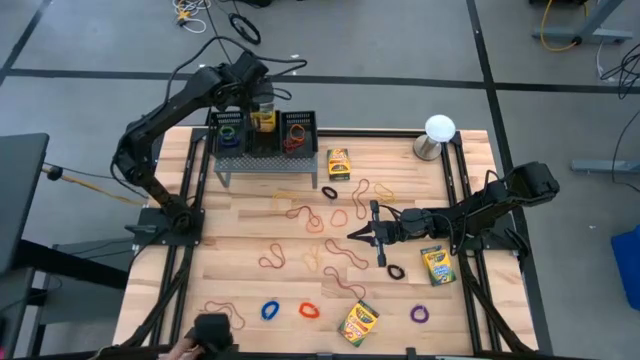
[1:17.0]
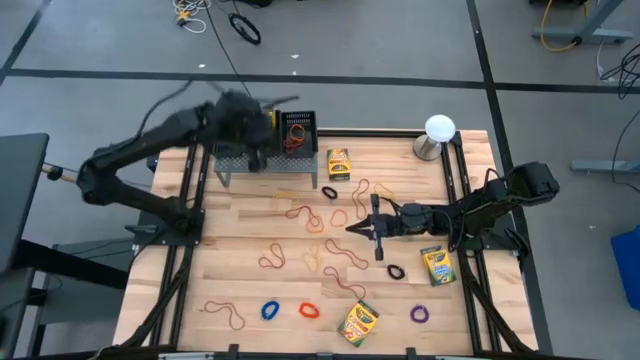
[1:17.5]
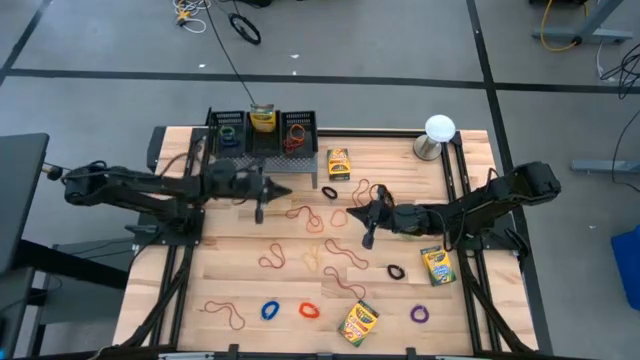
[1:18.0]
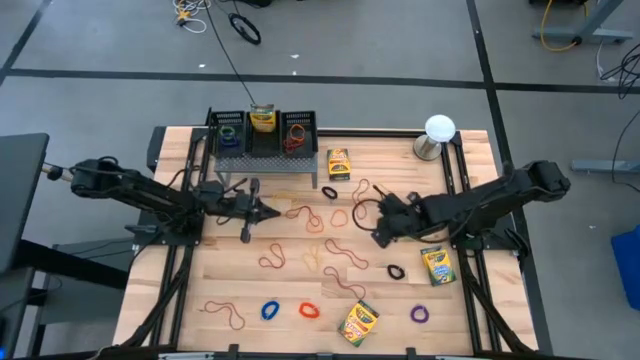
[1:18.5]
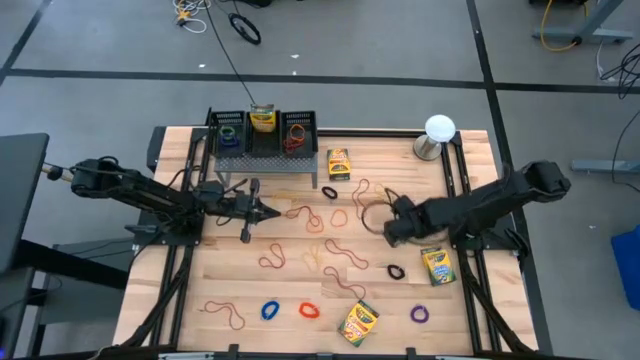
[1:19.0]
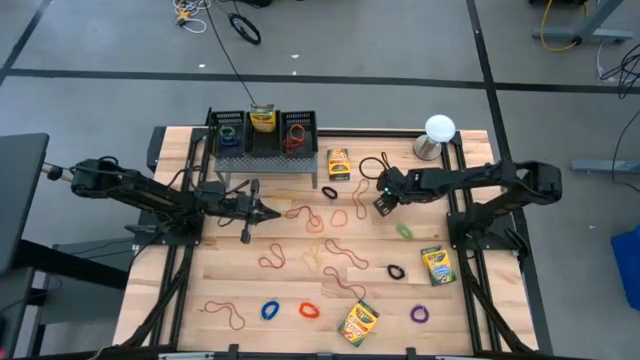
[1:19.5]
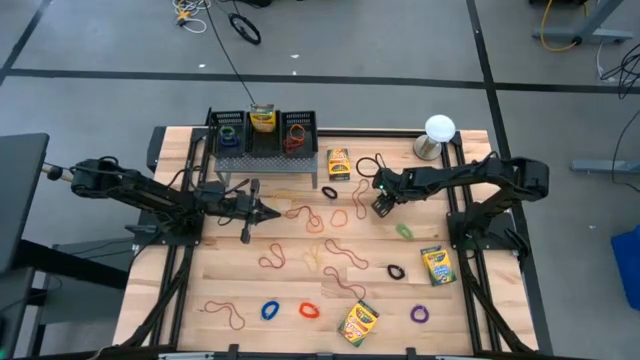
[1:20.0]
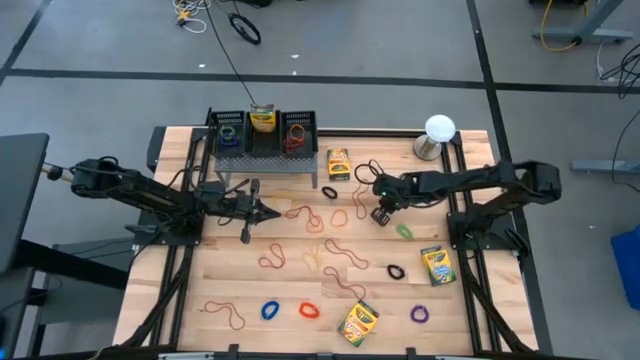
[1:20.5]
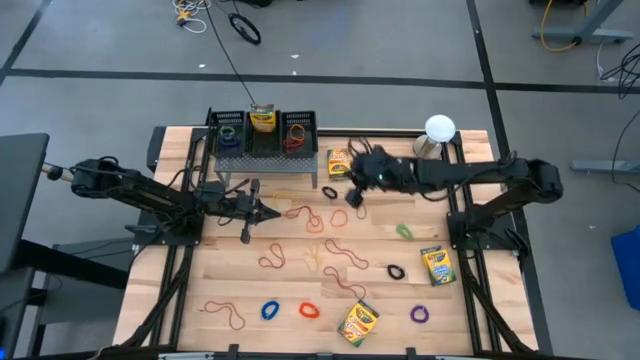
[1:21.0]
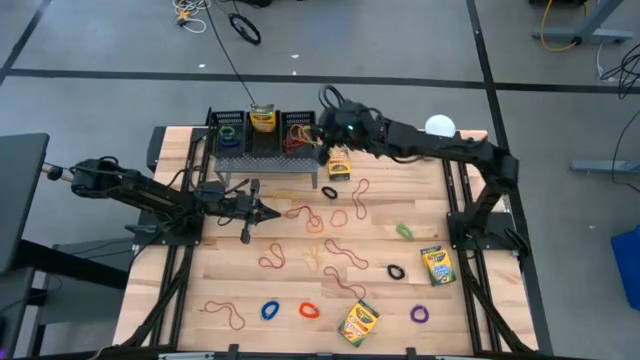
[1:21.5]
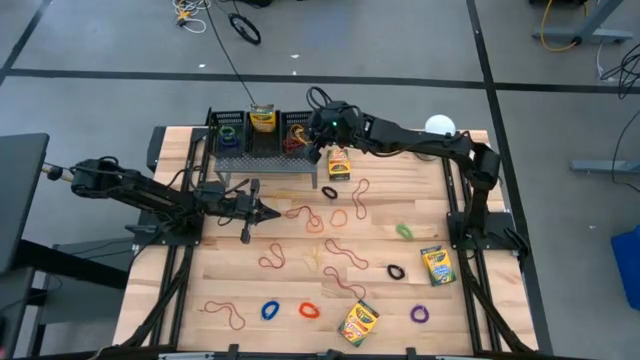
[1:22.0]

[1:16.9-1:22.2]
Task: Pick & Place Office Desk Supplies
Put the yellow rubber band into the right black bin

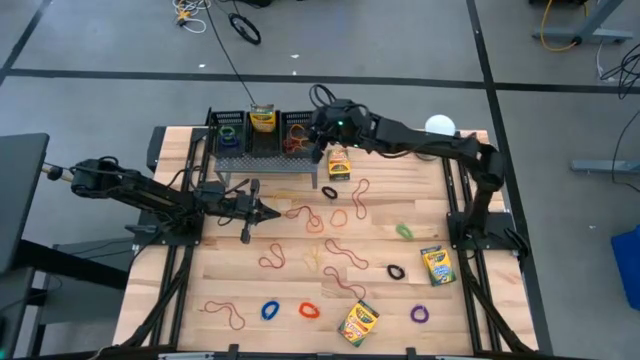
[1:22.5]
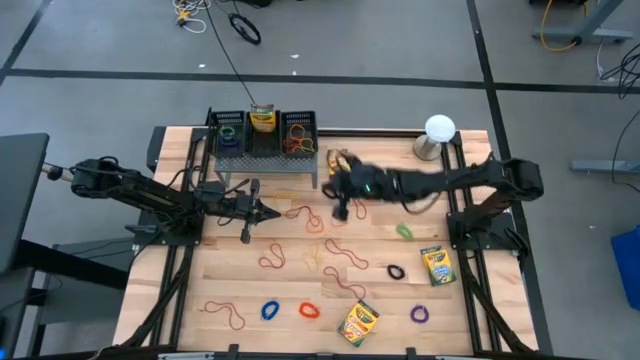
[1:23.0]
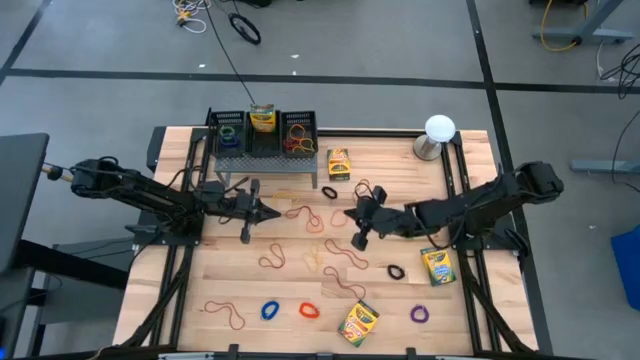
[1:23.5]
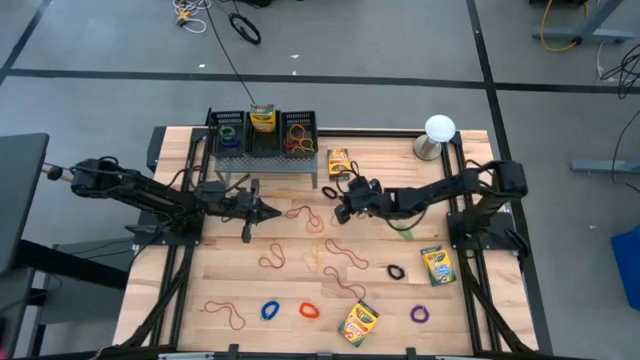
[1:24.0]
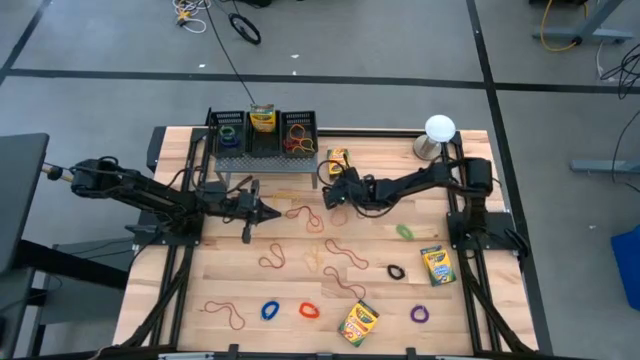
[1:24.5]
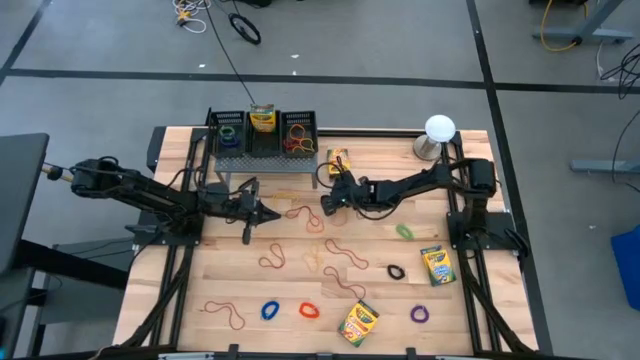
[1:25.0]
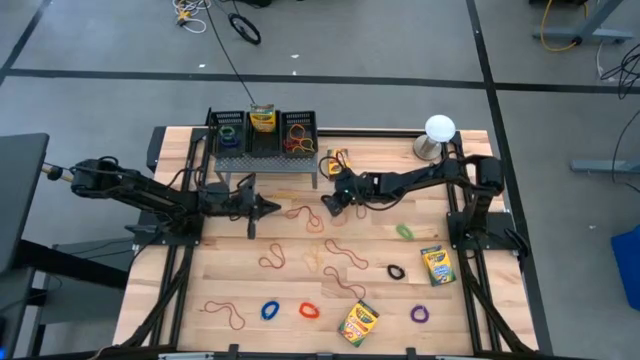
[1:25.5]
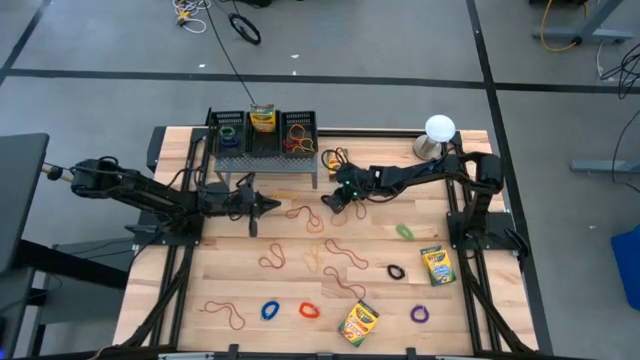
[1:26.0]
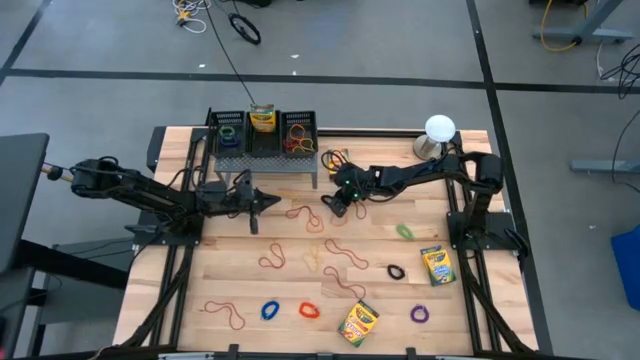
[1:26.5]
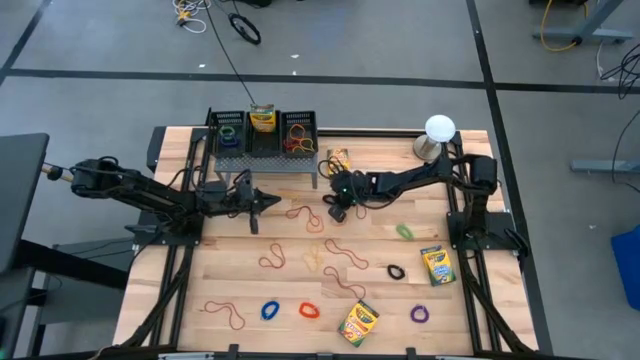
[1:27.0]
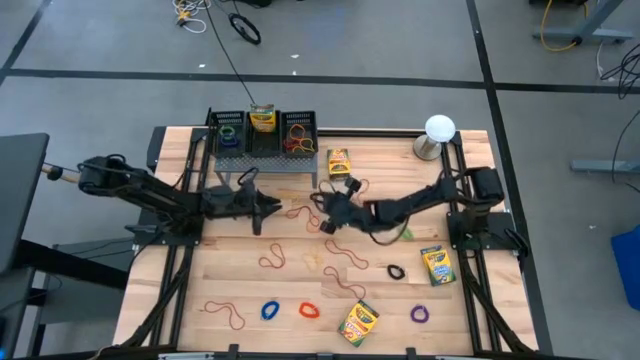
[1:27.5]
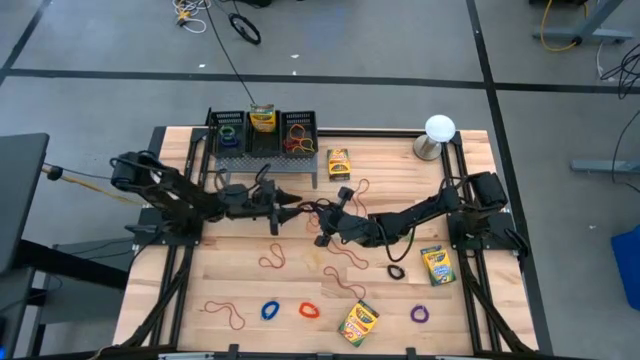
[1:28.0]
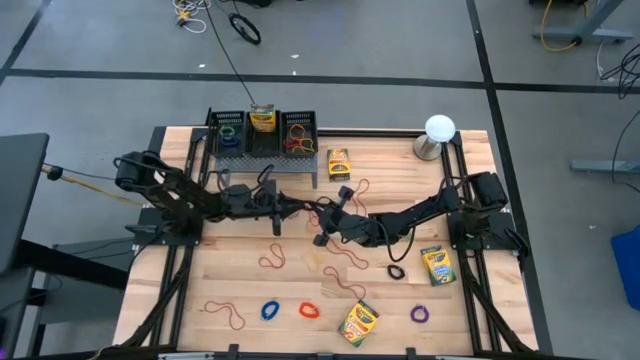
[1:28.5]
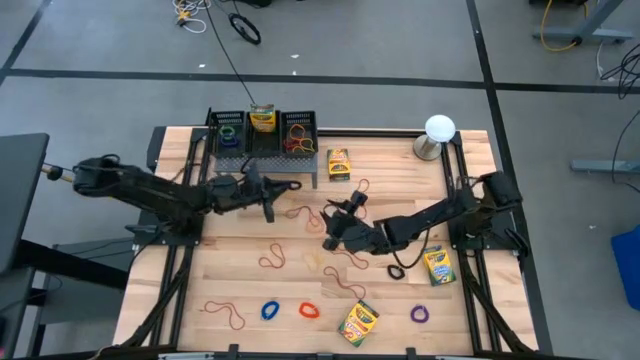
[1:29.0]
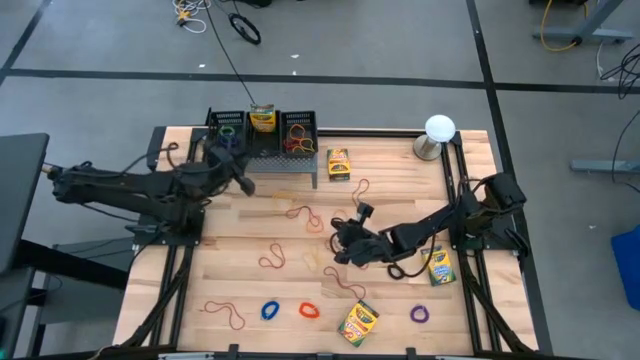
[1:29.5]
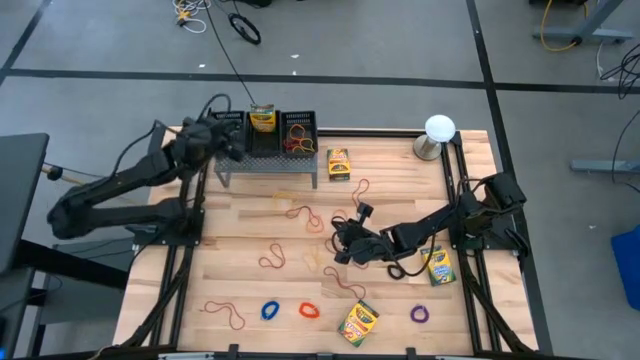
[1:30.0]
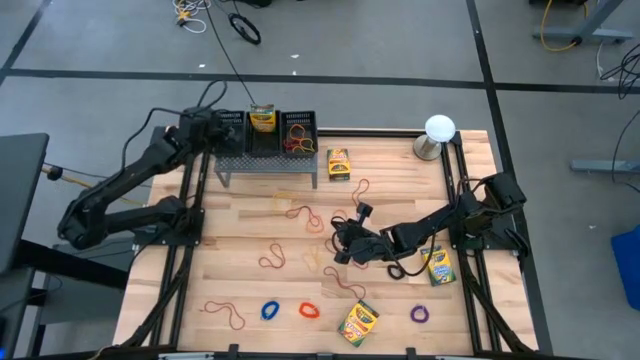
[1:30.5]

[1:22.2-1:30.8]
Put the top black spiral keychain into the left black bin

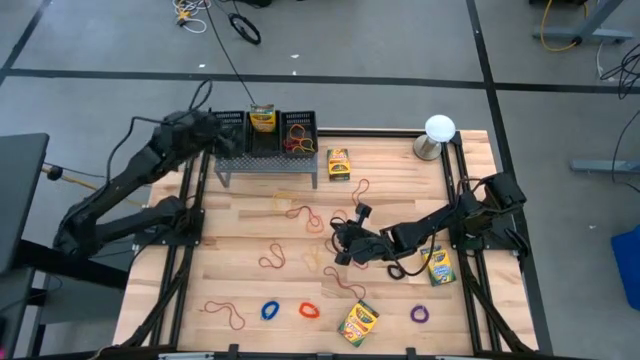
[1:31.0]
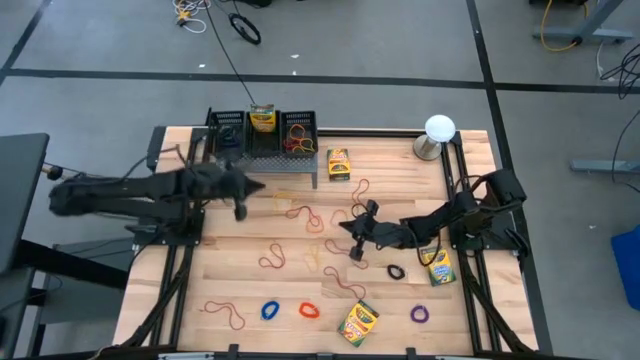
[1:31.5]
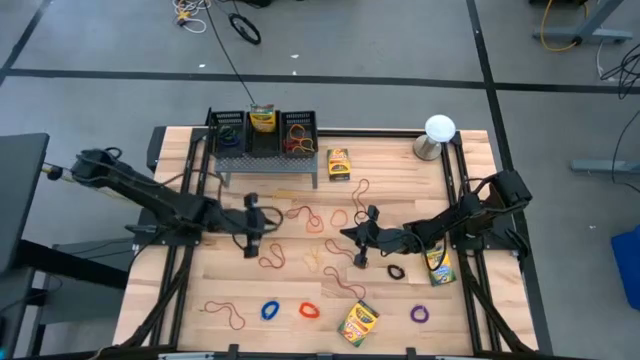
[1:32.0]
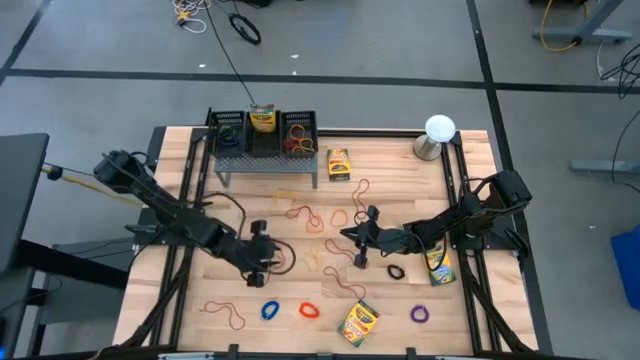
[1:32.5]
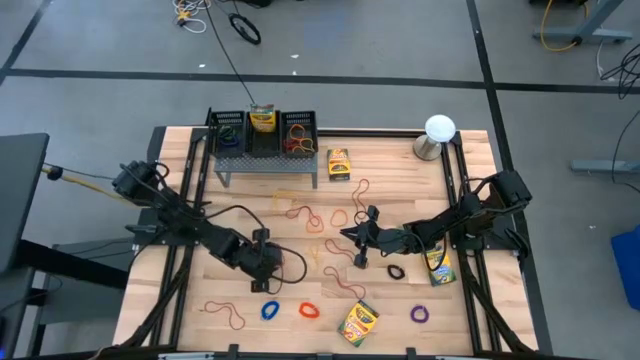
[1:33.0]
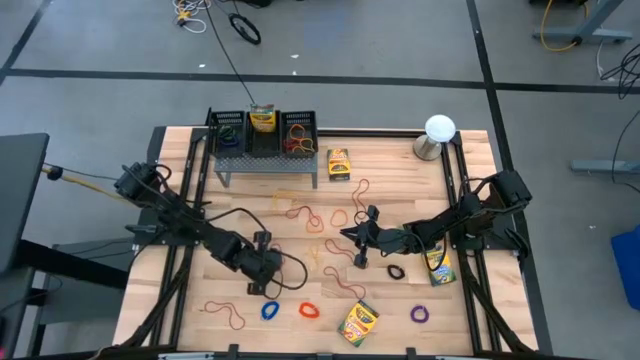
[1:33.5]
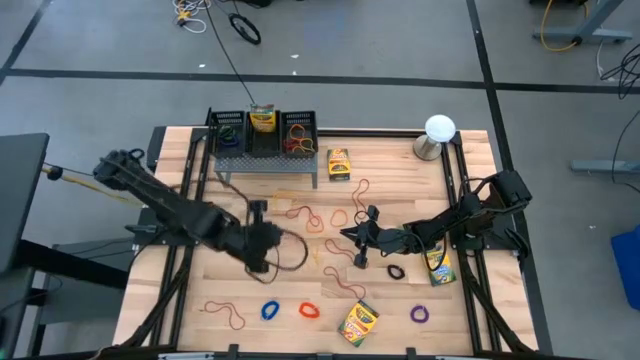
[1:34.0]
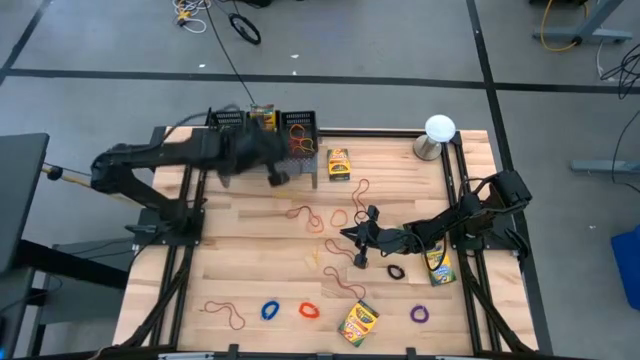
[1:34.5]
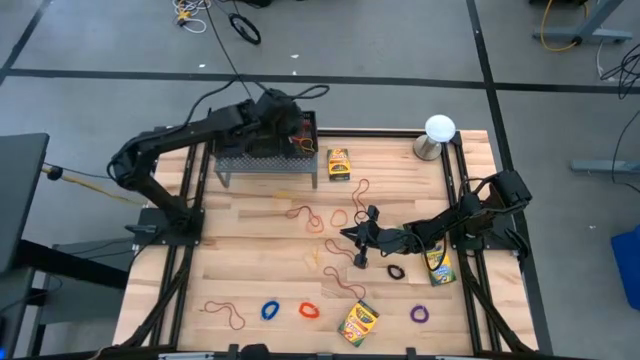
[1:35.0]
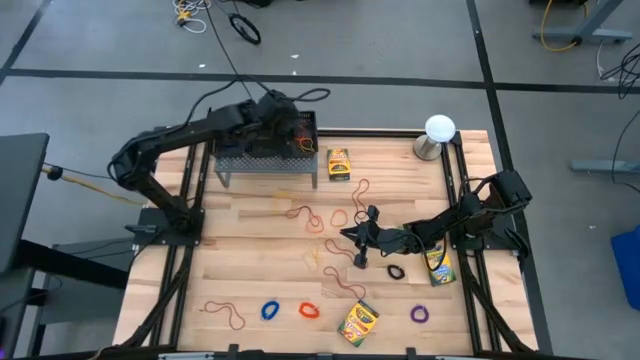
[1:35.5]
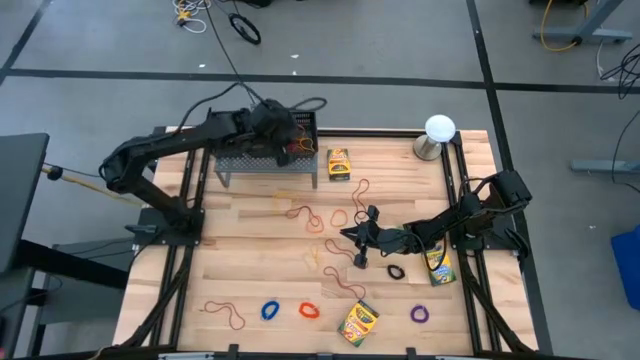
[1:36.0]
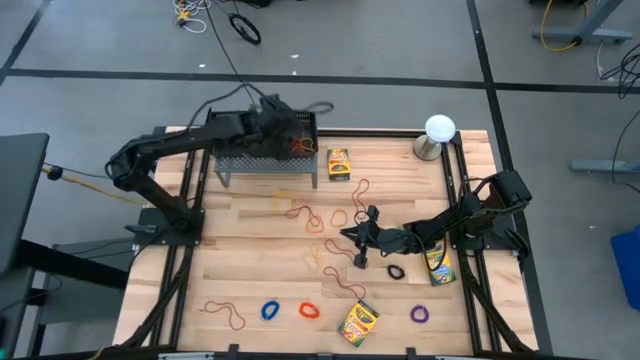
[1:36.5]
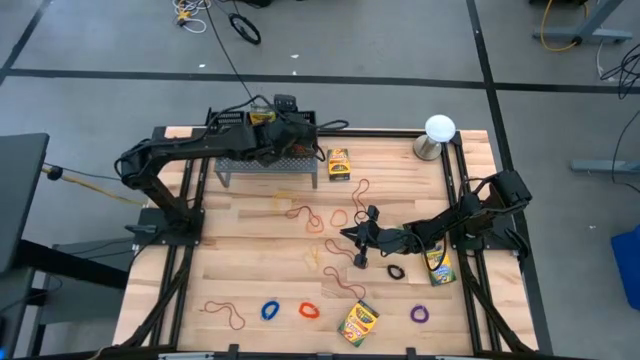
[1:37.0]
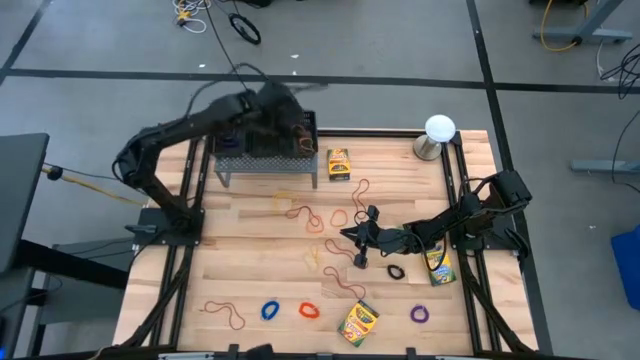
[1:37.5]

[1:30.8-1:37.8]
Put the red rubber band into the right black bin

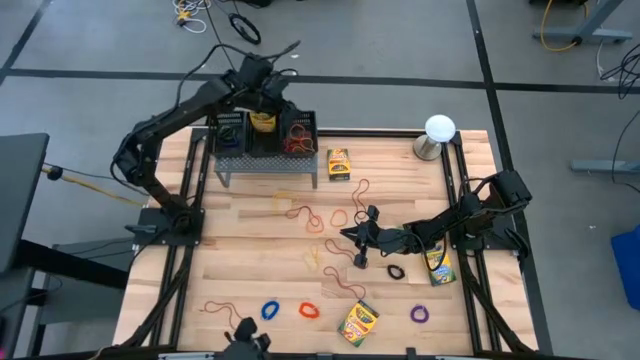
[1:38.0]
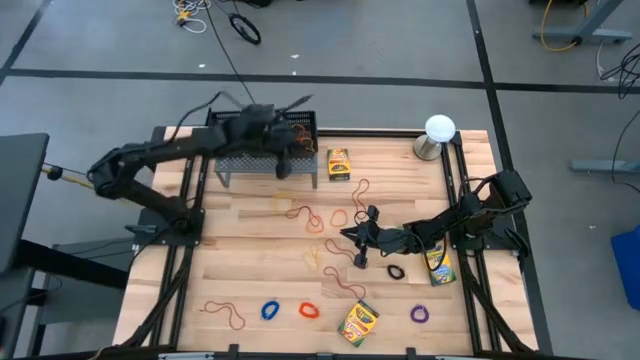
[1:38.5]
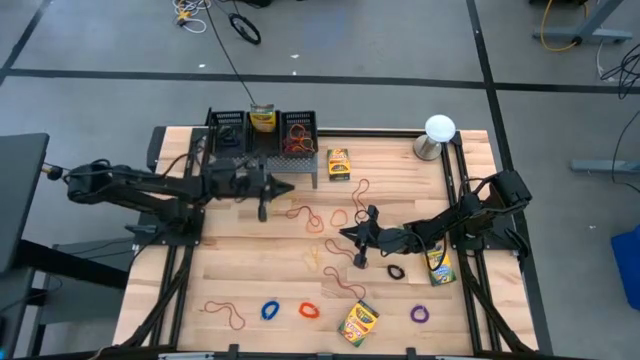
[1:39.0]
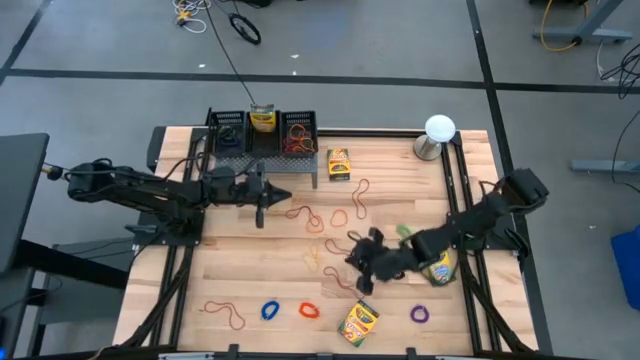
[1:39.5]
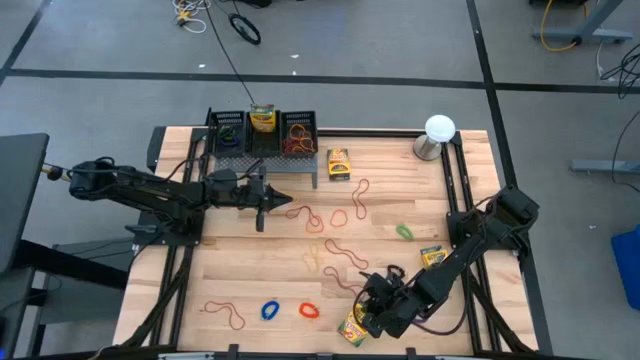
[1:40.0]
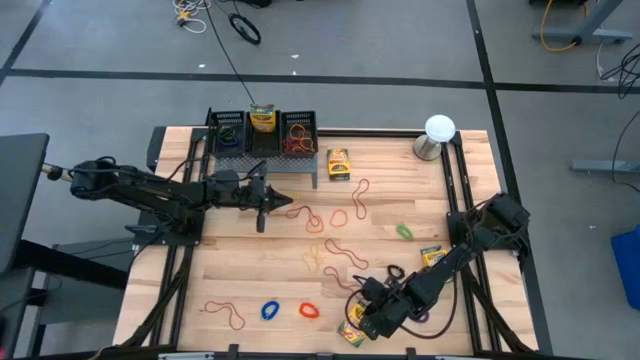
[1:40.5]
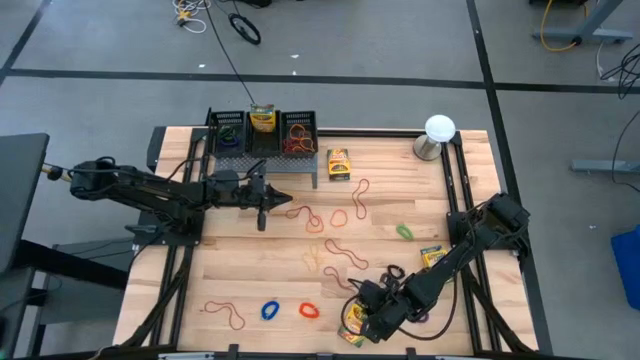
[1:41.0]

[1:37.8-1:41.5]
Put the yellow crayon box into the middle black bin
